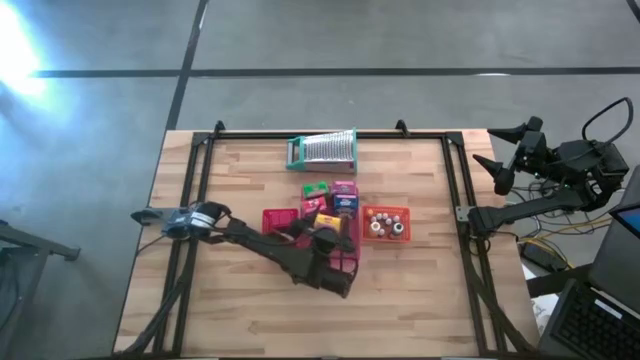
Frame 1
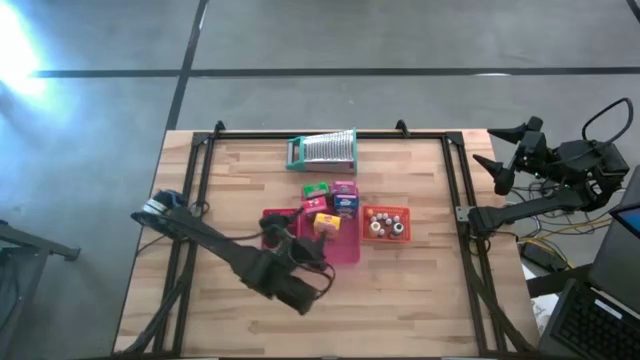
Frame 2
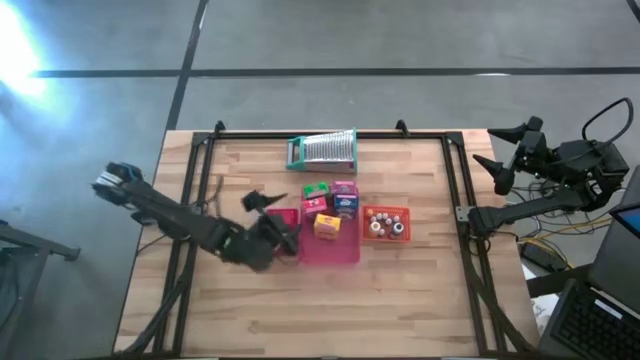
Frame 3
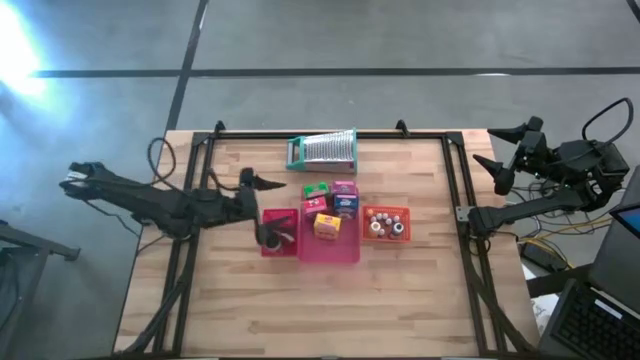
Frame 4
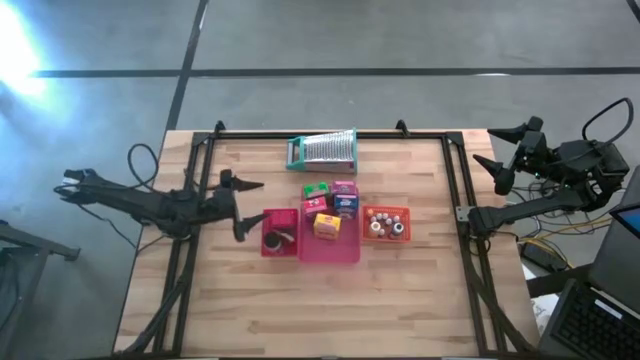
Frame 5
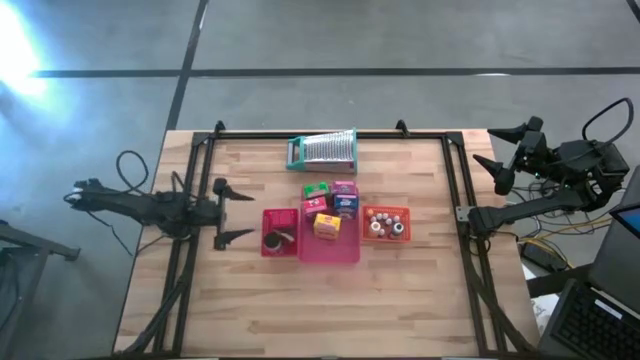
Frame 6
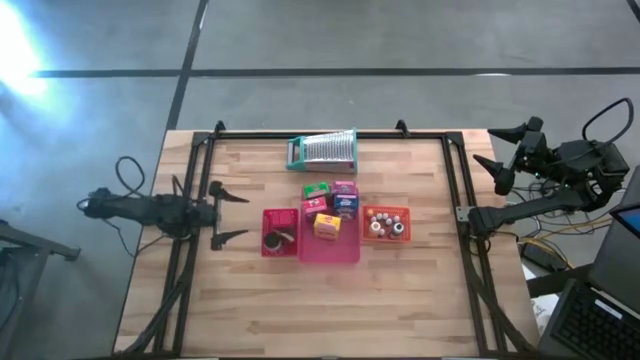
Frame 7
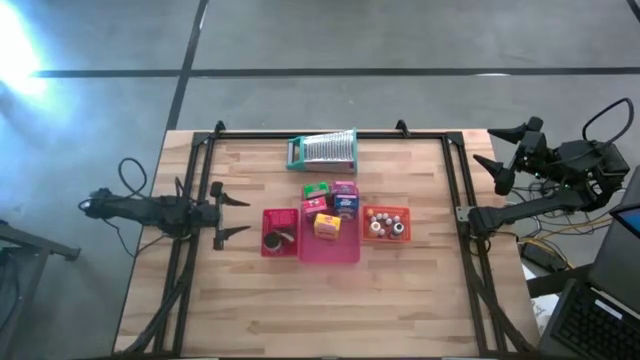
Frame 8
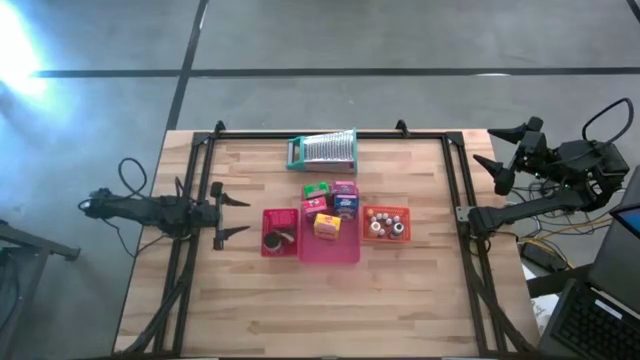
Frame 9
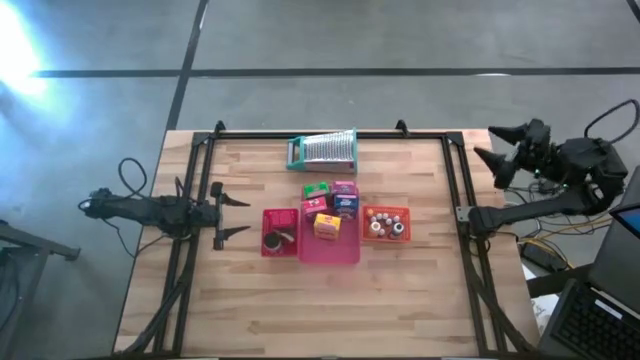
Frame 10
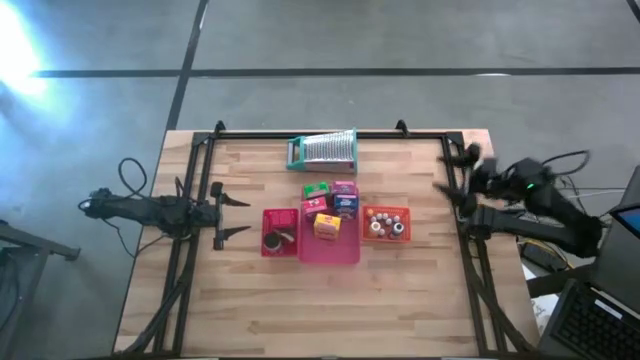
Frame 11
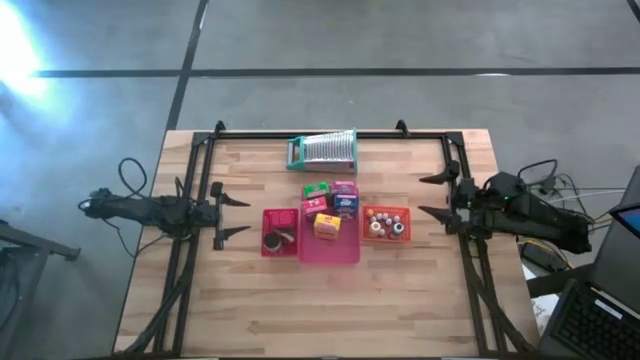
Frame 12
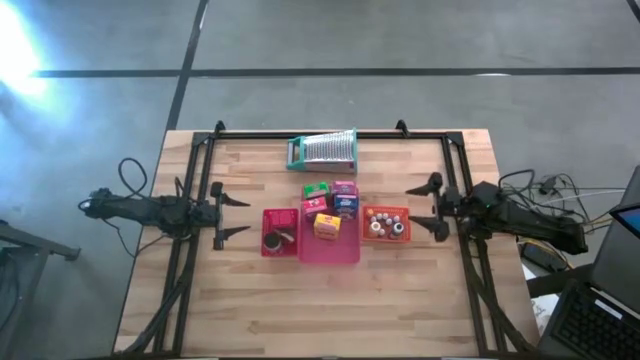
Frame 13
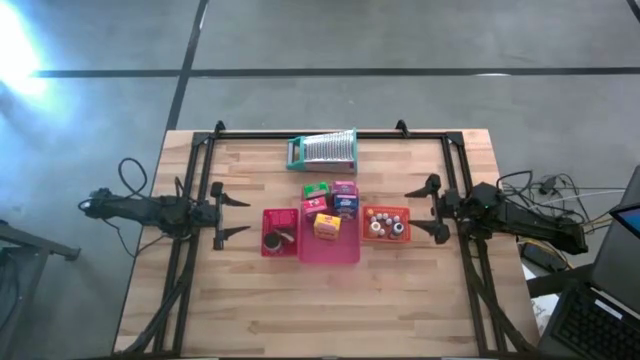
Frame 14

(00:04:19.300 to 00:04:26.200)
Task: Pick & Place Kitchen Items
Return to Home Position

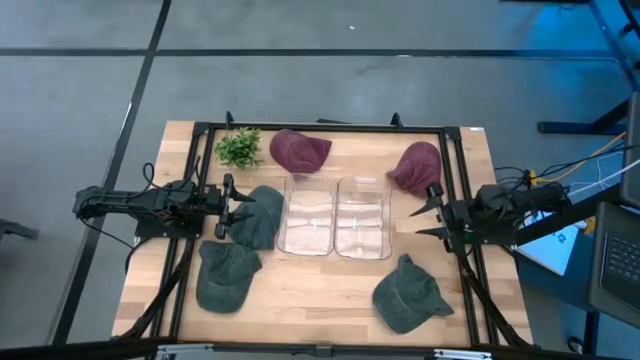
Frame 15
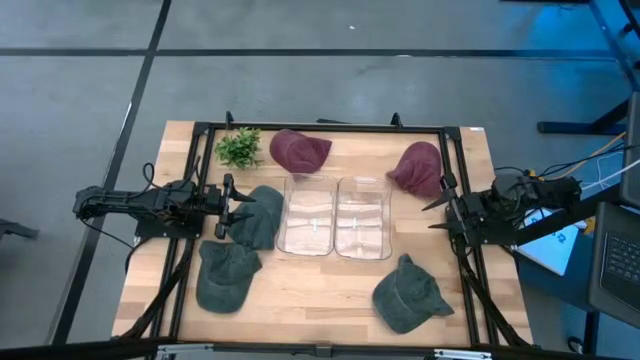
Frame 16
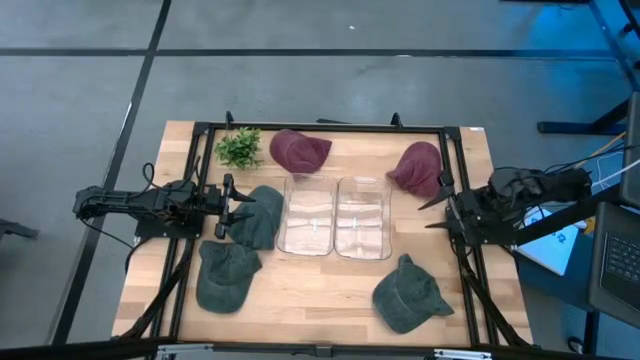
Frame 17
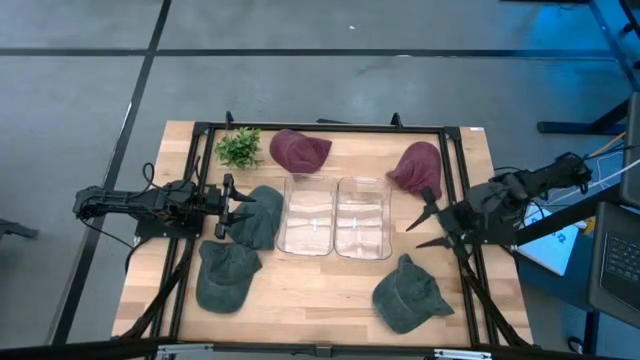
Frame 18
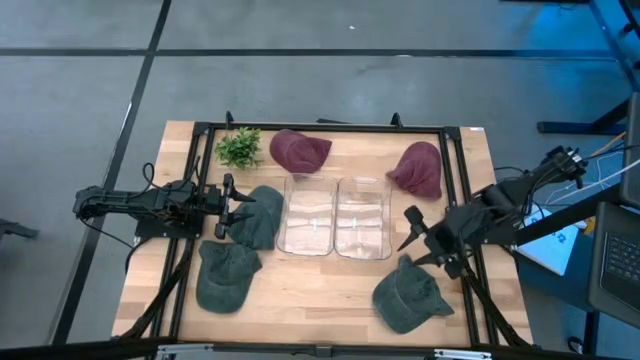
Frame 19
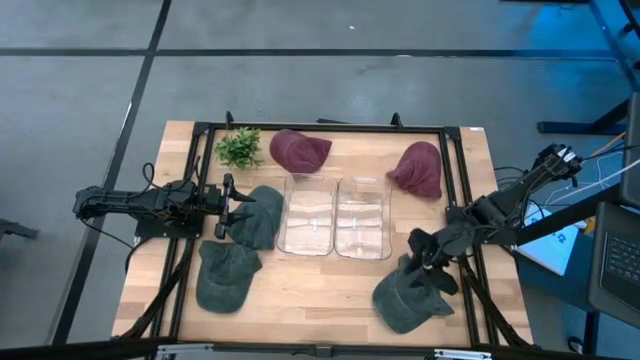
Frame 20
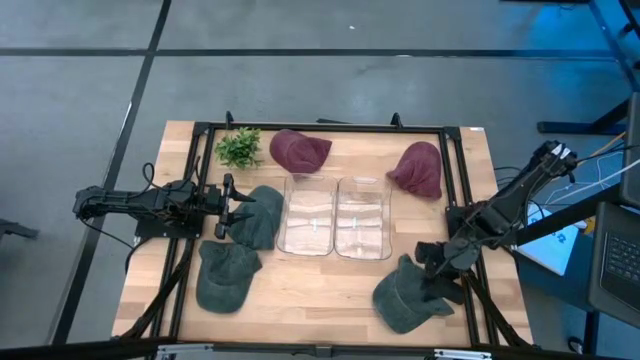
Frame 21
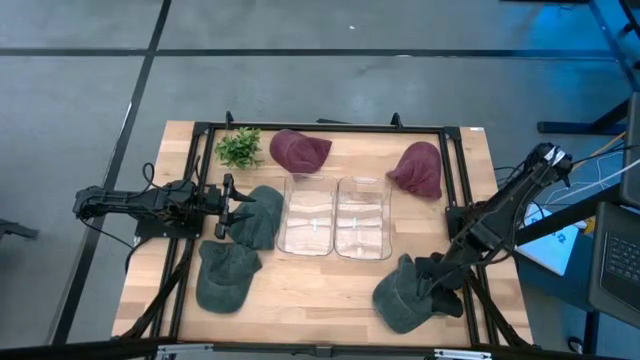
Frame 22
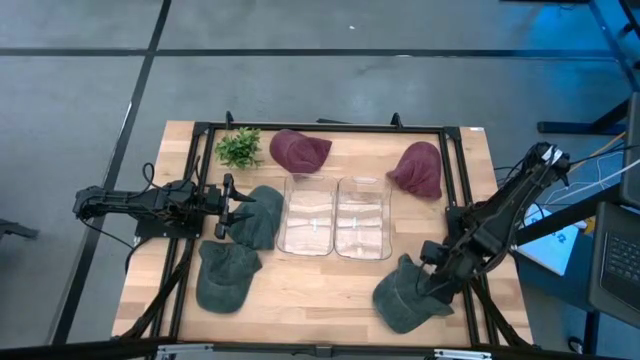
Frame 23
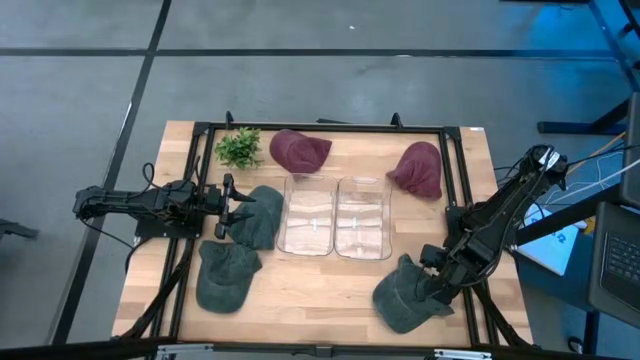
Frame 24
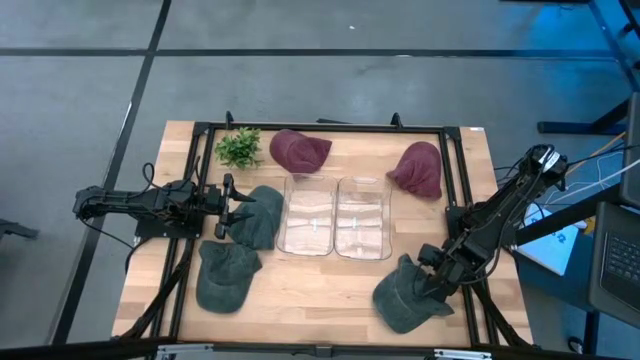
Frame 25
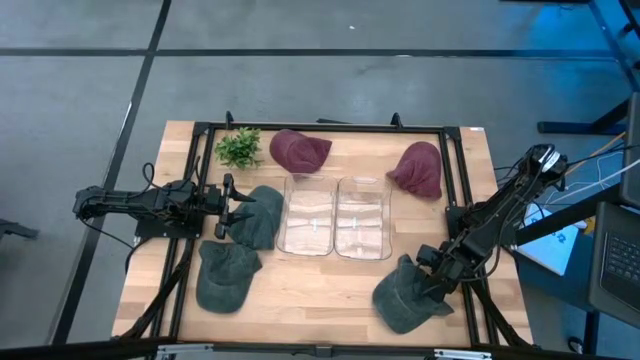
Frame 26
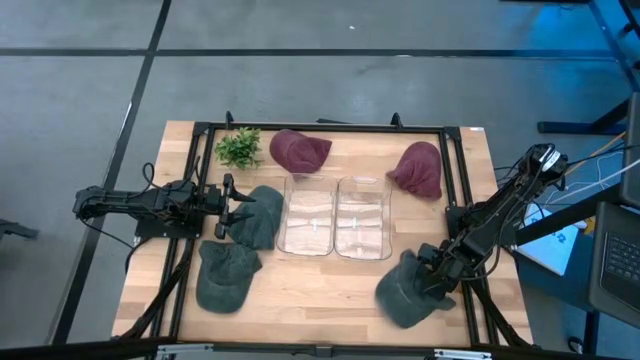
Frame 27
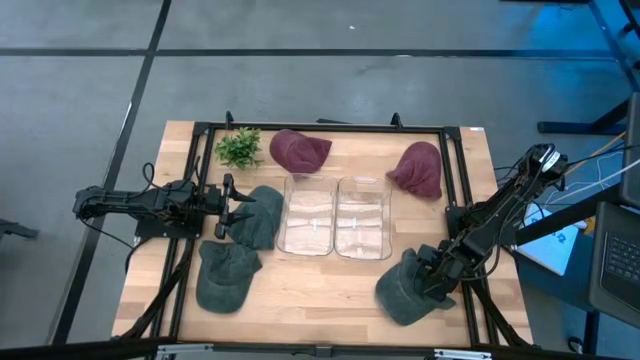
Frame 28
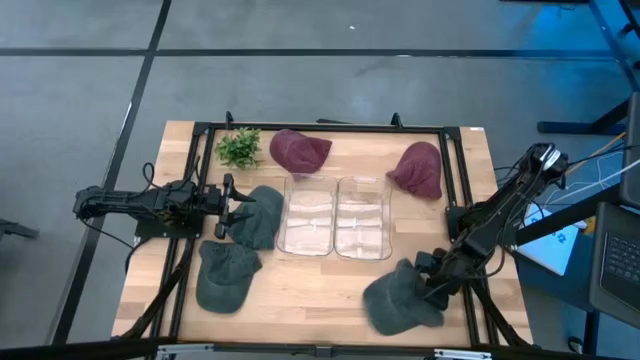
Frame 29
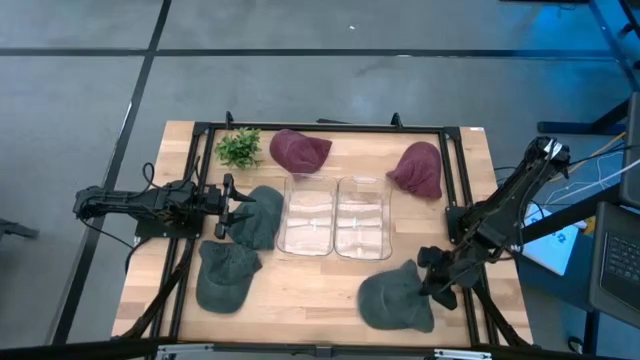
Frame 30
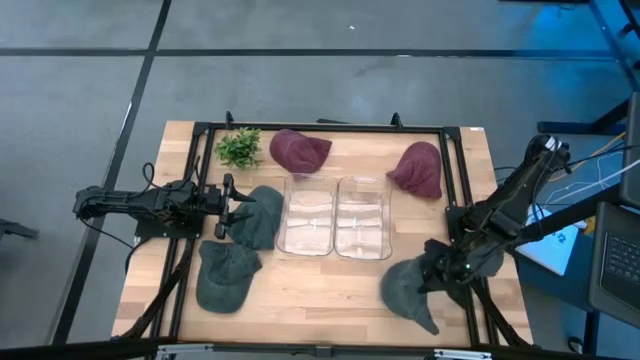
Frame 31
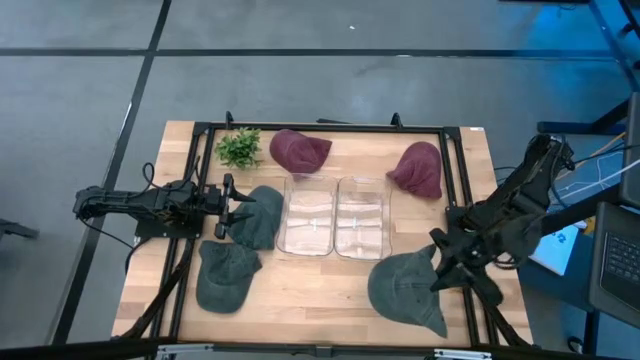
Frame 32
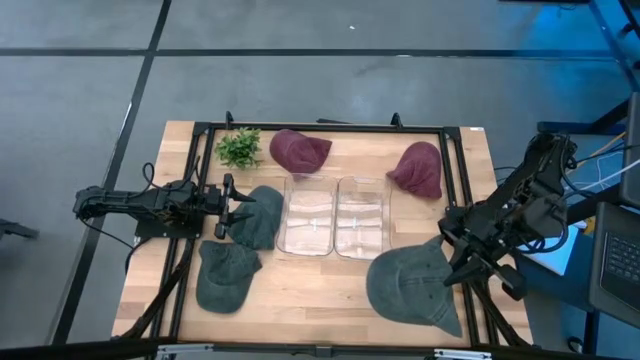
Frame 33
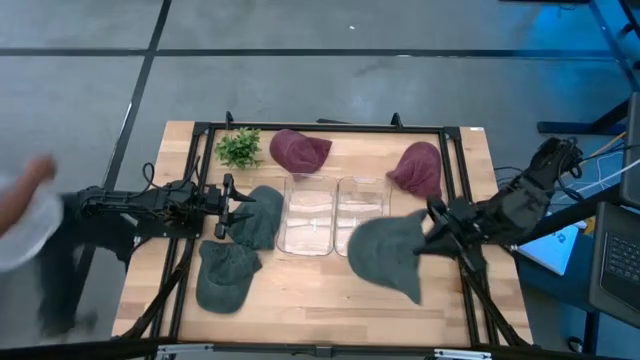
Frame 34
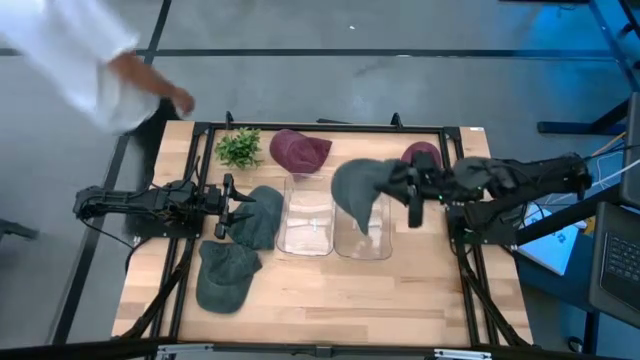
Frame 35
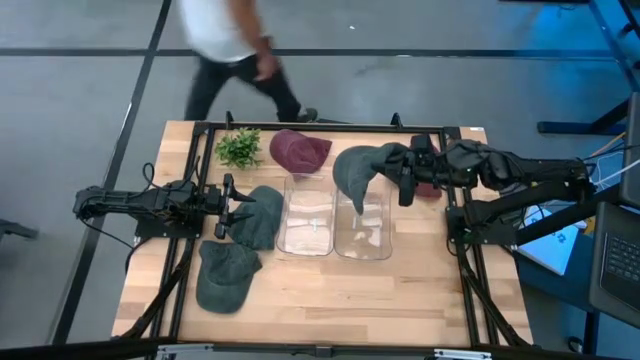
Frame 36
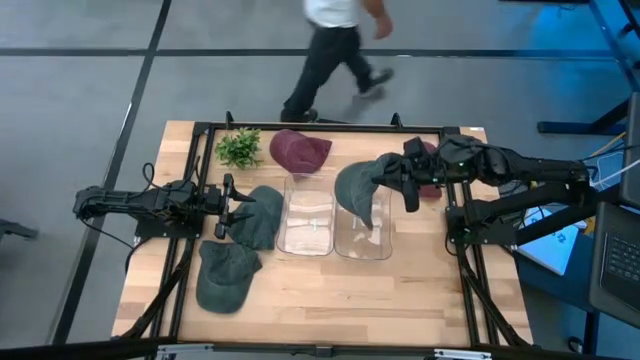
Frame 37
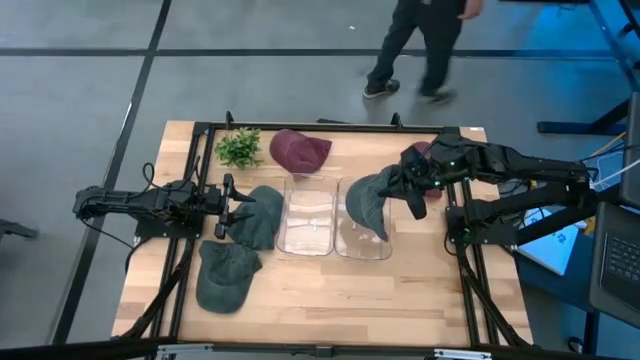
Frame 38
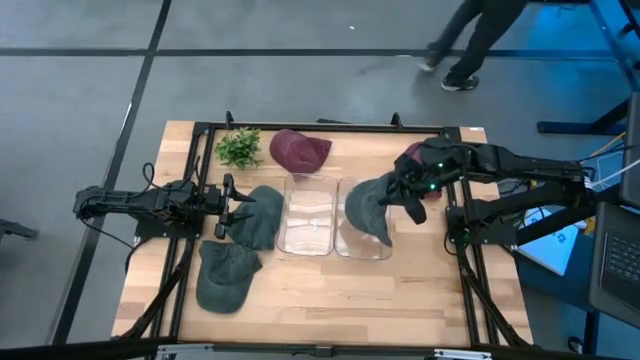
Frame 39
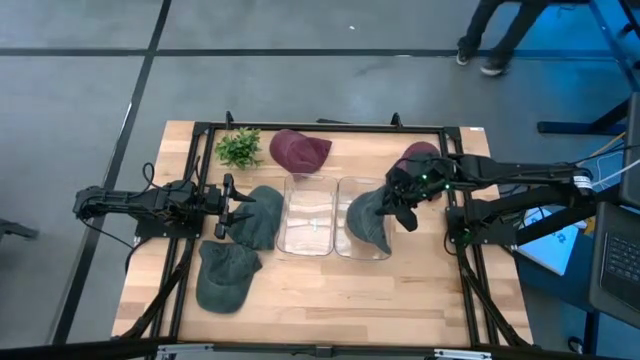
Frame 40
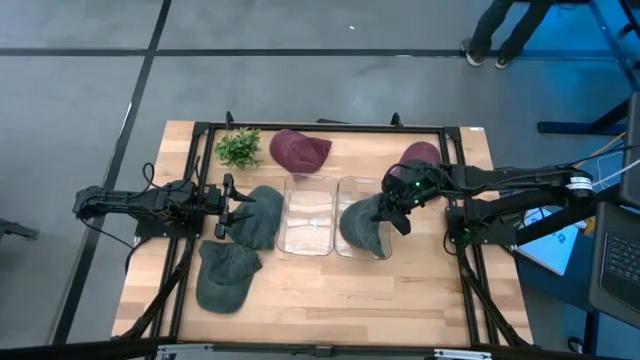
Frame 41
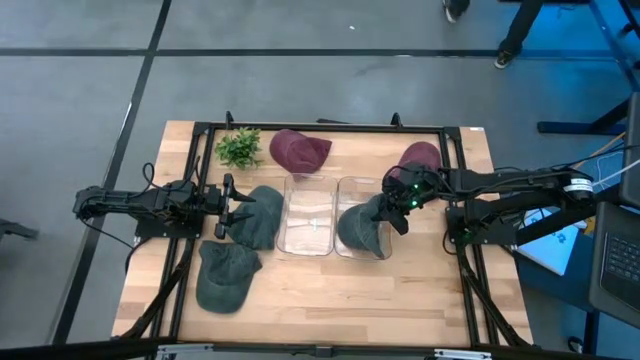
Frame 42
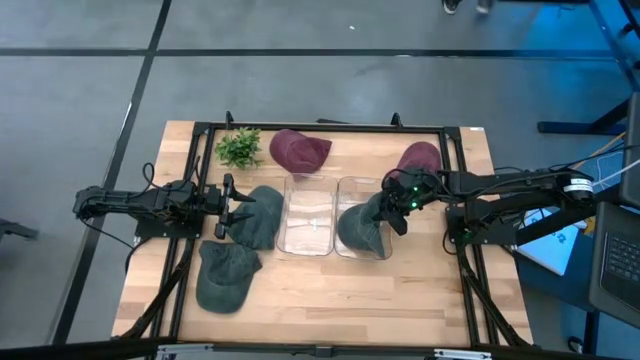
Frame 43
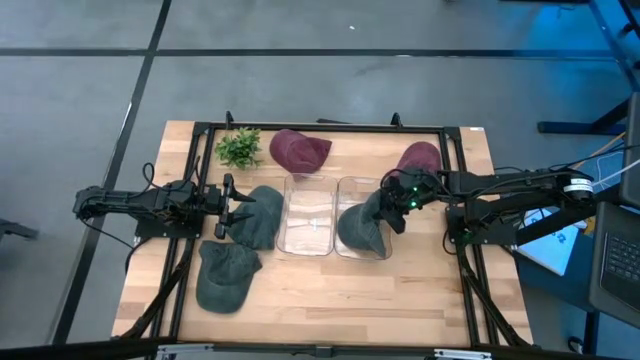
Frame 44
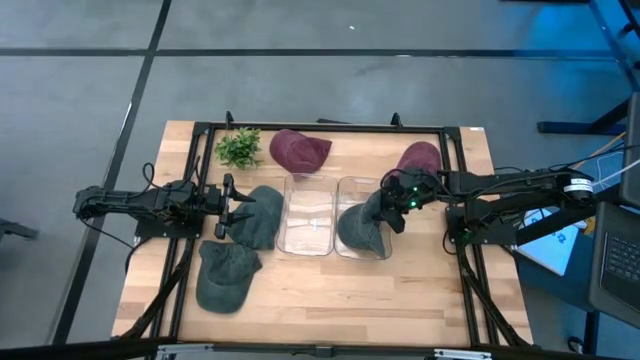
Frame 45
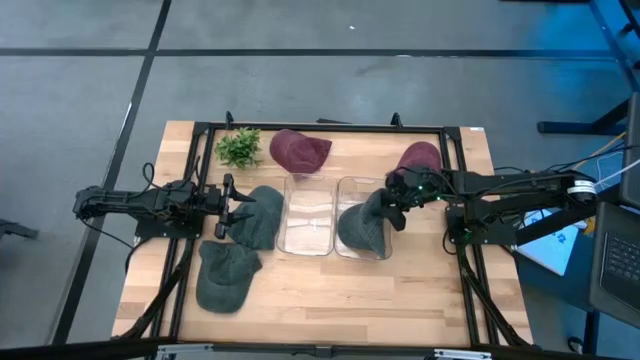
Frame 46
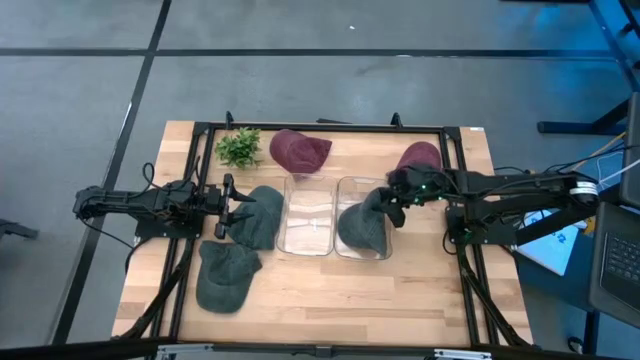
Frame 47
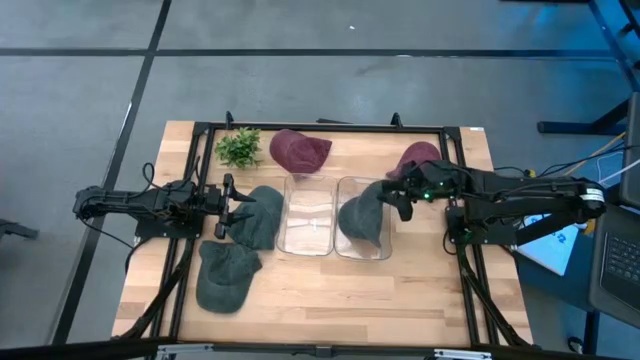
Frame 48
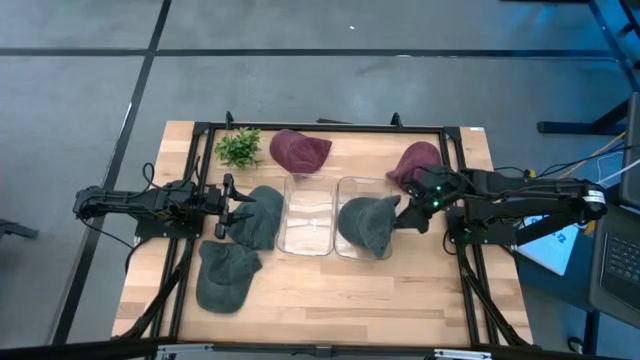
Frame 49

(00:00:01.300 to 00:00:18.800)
Task: Pick & Place hat
Put the bottom right blue cap into the right transparent bin
